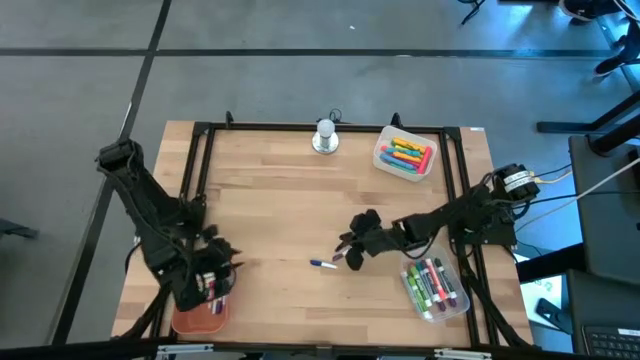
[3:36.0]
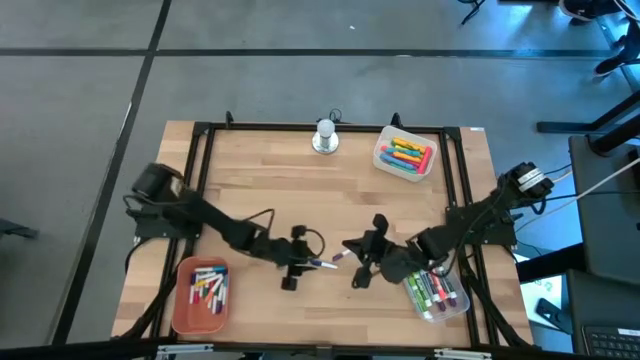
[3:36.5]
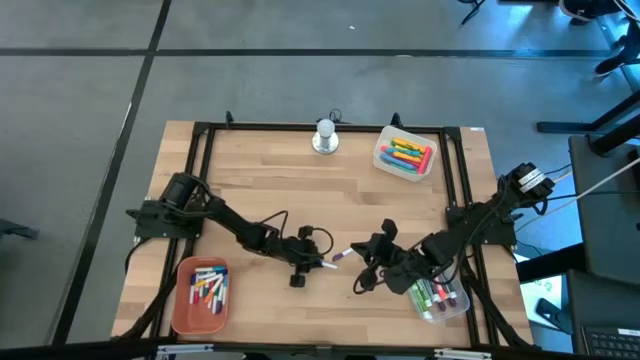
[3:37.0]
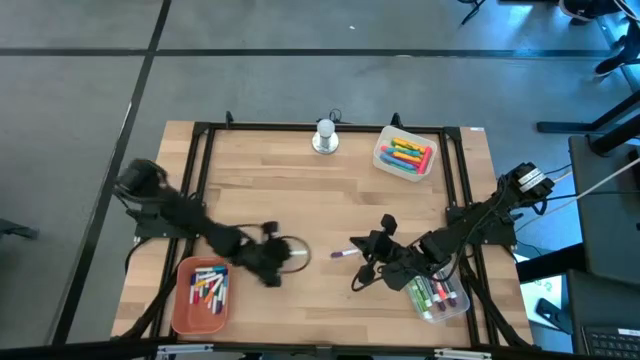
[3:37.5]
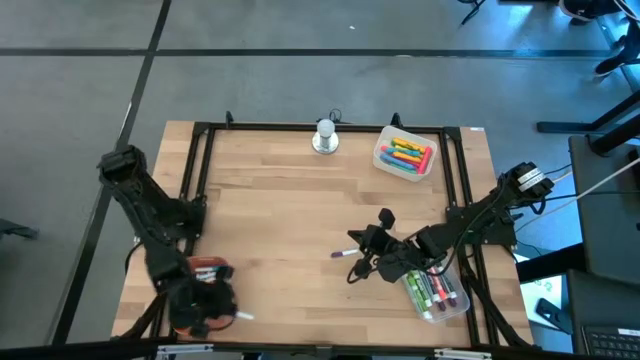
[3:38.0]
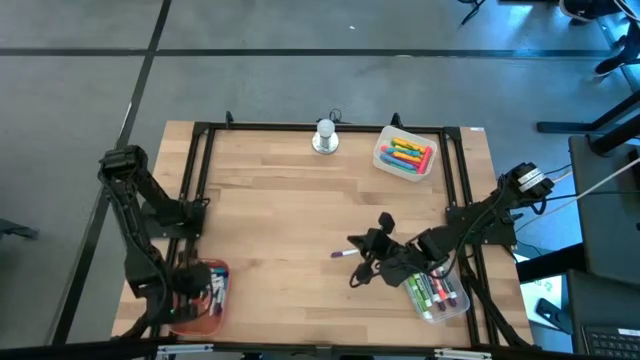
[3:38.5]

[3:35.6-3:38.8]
Task: Pick & Place Markers
Put the small blue highlighter pen into the orange bin

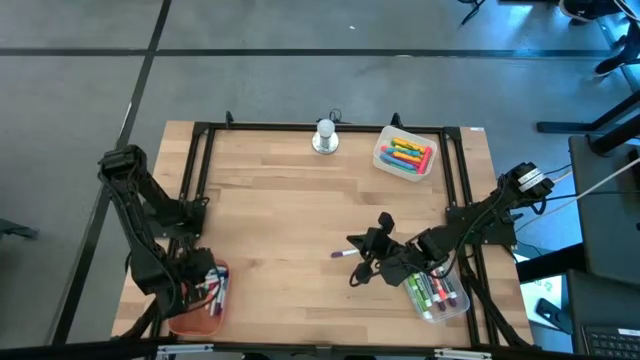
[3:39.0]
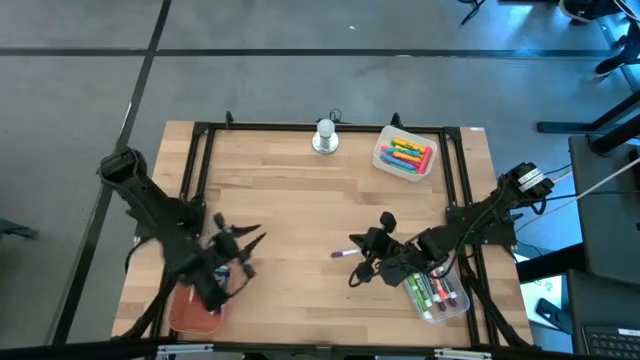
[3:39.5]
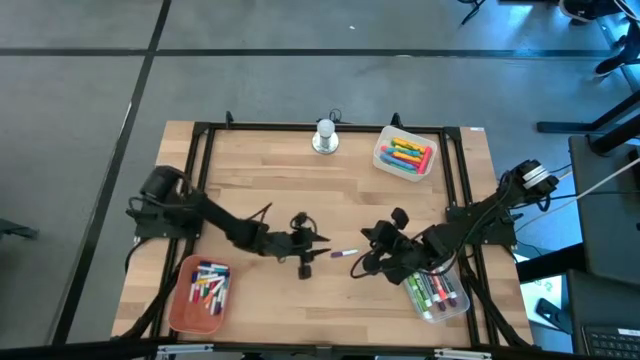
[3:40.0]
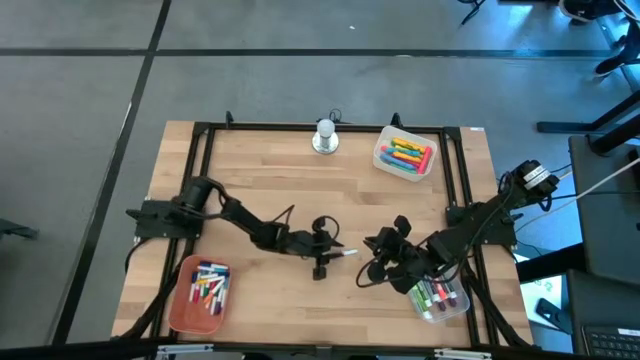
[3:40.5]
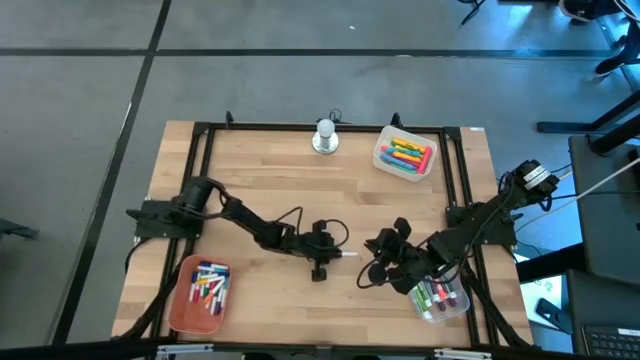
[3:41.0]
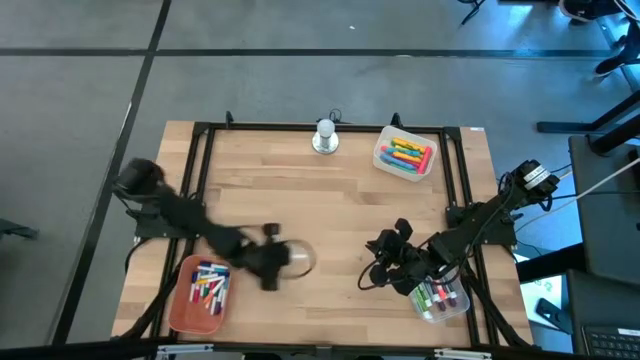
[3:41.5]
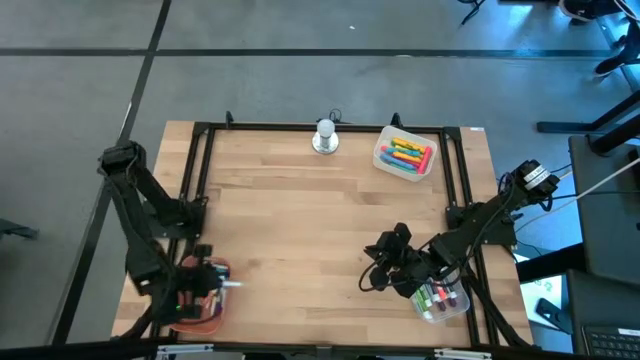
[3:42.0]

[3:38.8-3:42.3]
Put the small violet highlighter pen into the orange bin

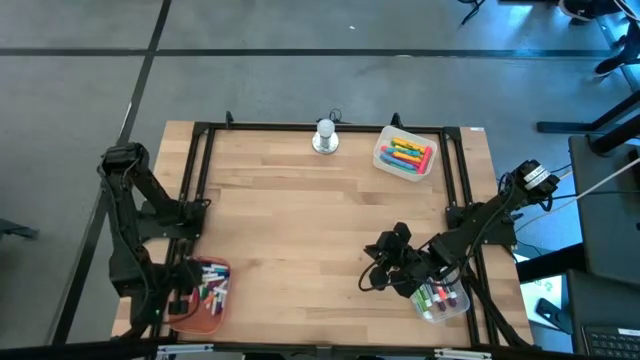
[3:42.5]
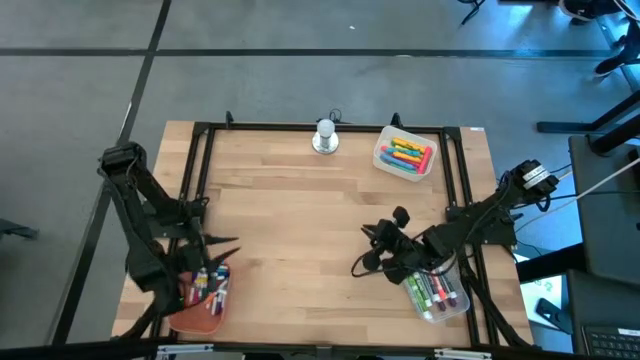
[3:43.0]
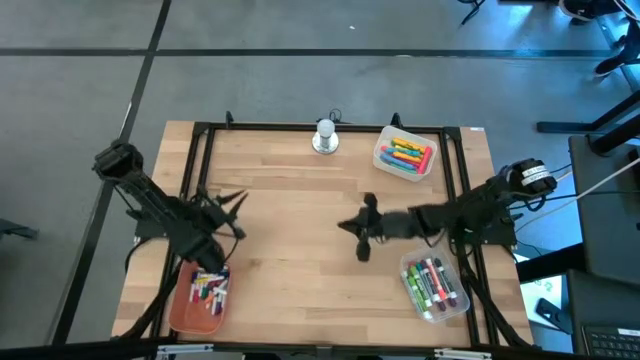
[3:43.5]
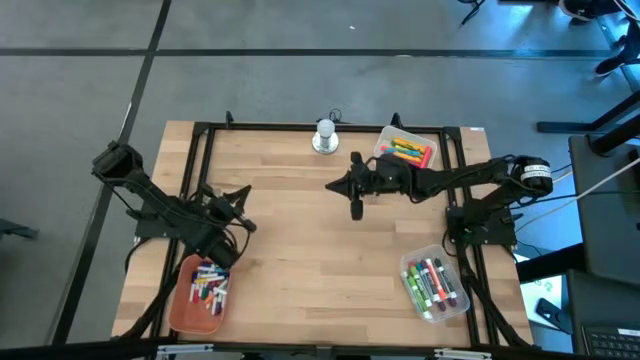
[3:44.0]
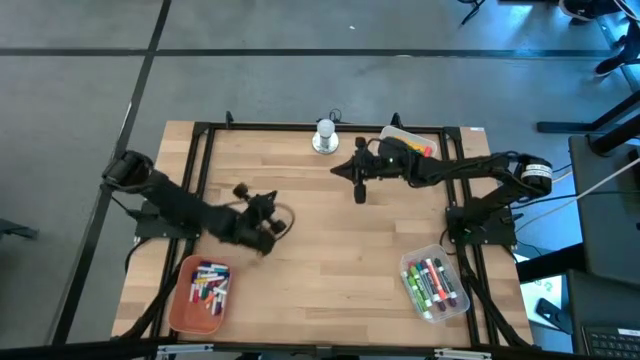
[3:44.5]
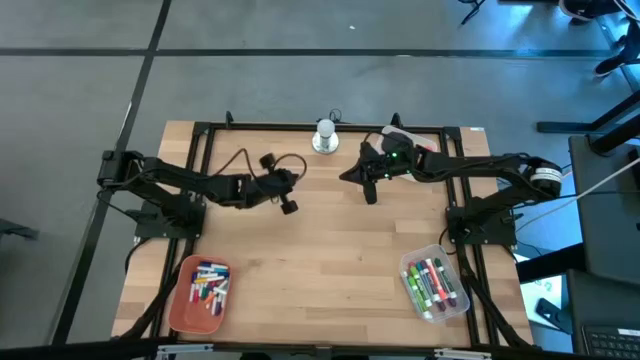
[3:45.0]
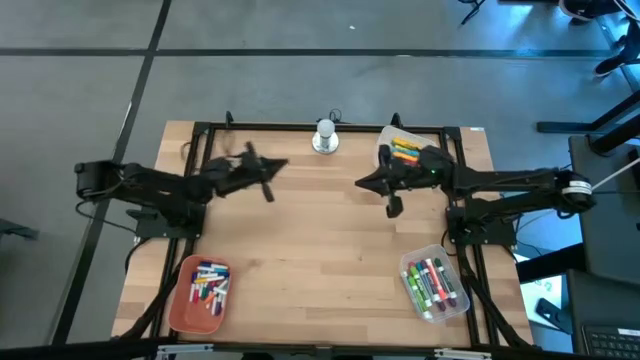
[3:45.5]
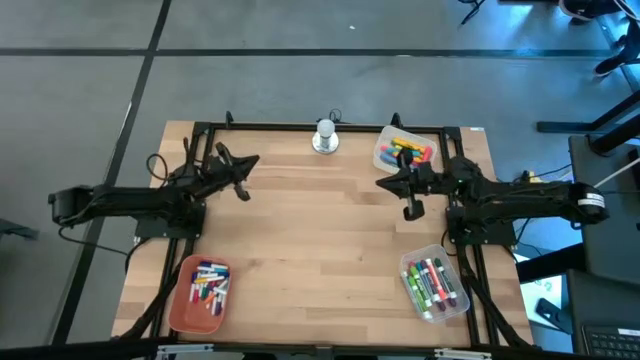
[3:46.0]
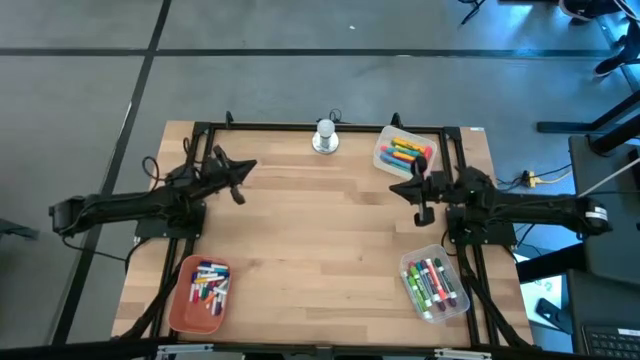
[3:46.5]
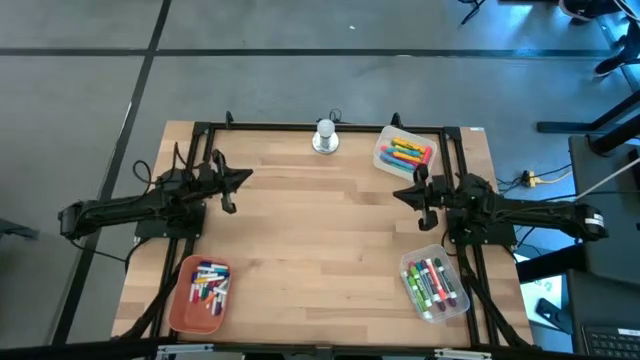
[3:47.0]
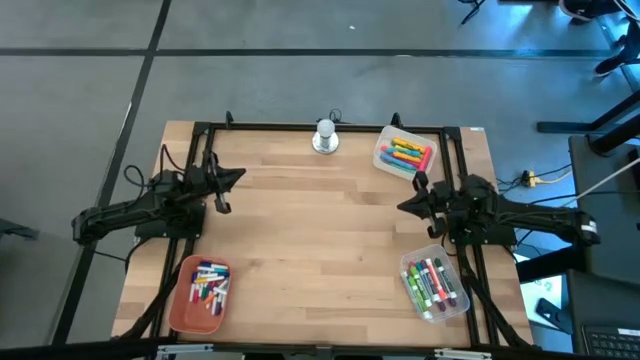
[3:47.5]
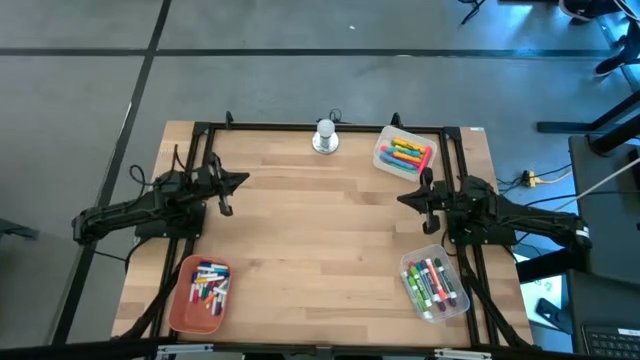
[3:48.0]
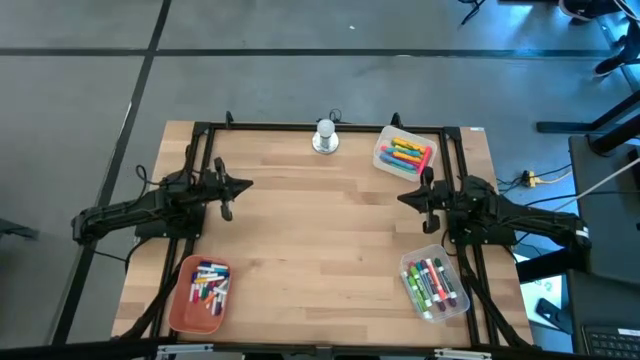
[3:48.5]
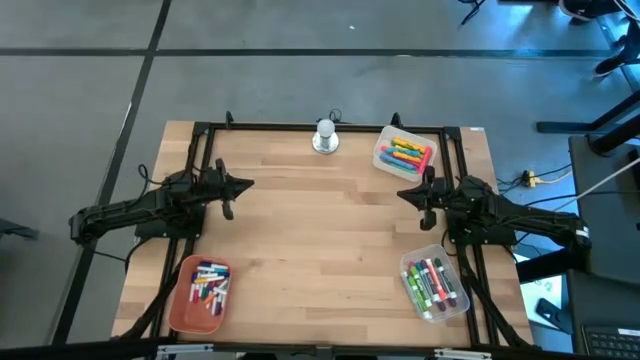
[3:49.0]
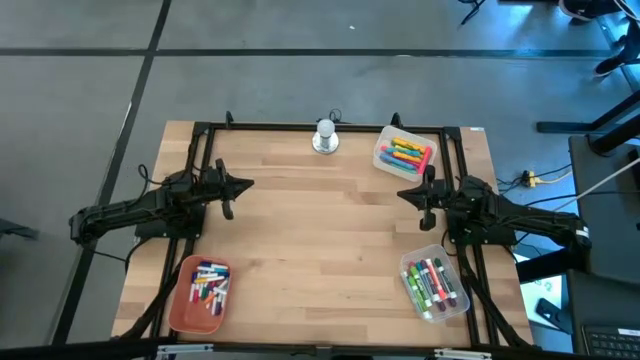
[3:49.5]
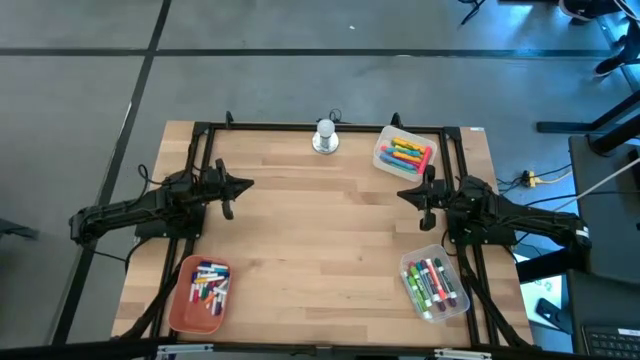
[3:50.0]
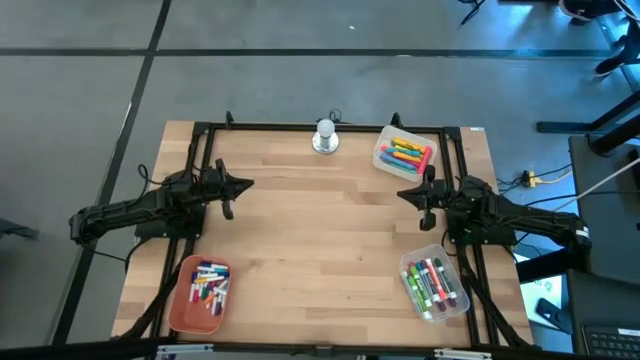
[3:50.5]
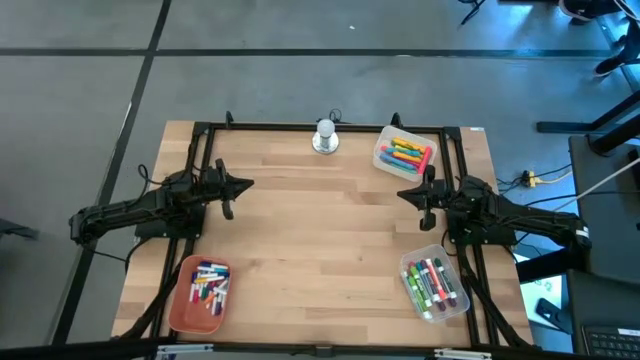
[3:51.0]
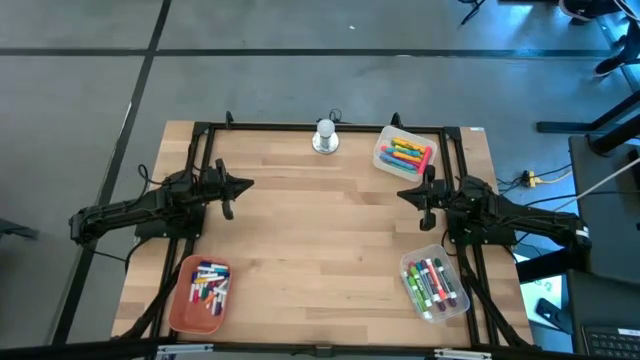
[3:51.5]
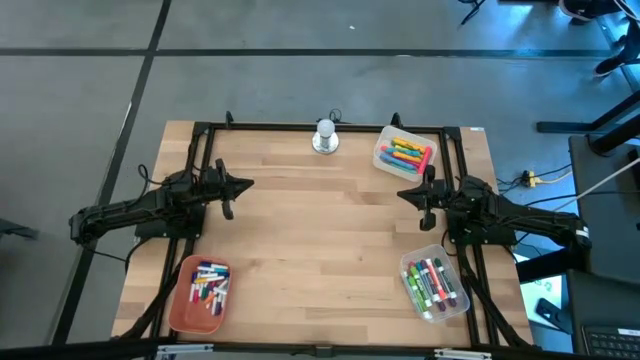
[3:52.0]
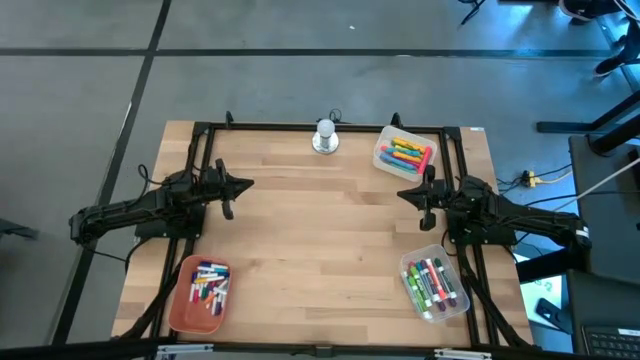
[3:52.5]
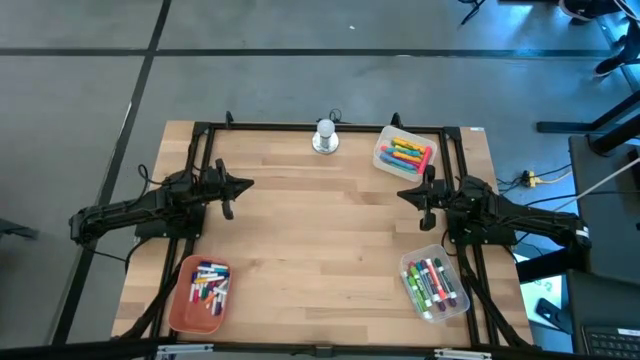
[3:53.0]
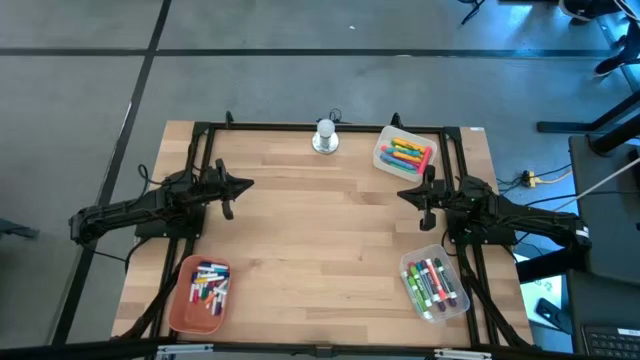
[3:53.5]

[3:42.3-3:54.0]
Return to Home Position

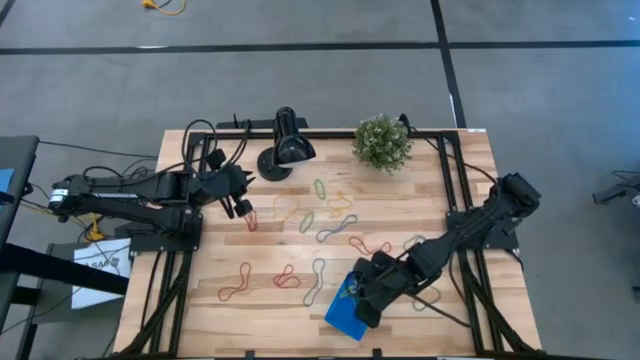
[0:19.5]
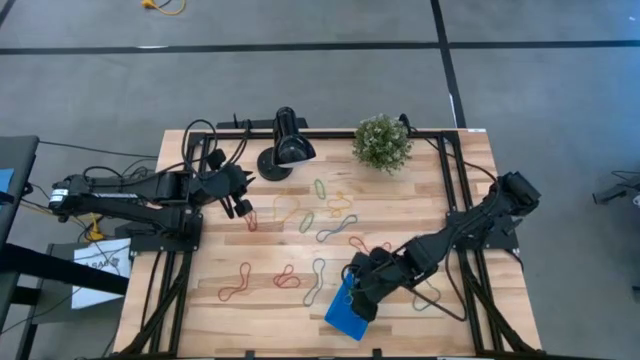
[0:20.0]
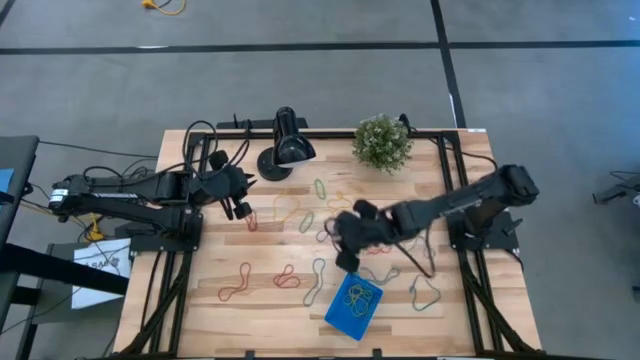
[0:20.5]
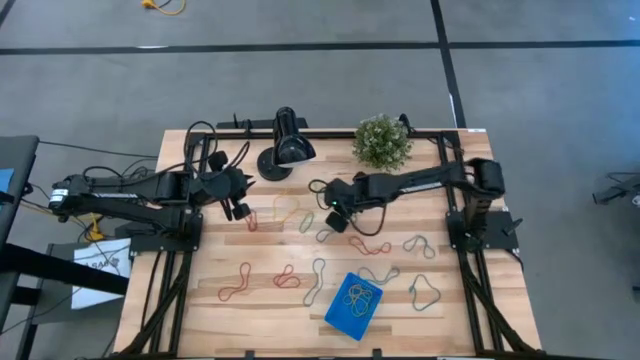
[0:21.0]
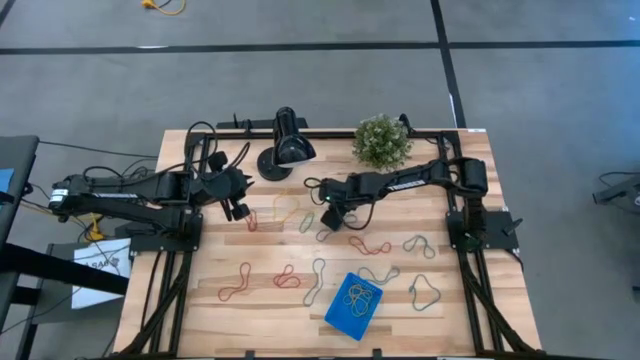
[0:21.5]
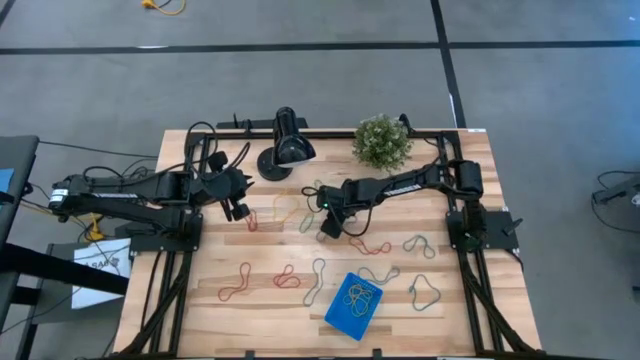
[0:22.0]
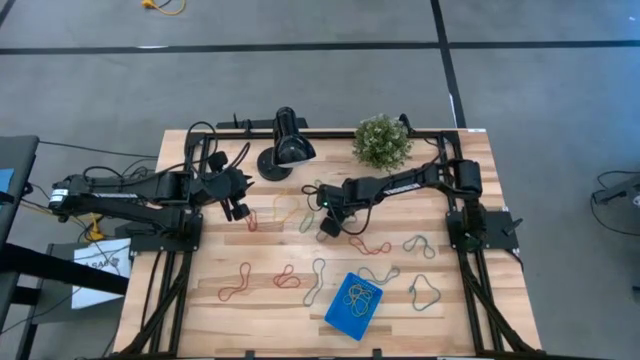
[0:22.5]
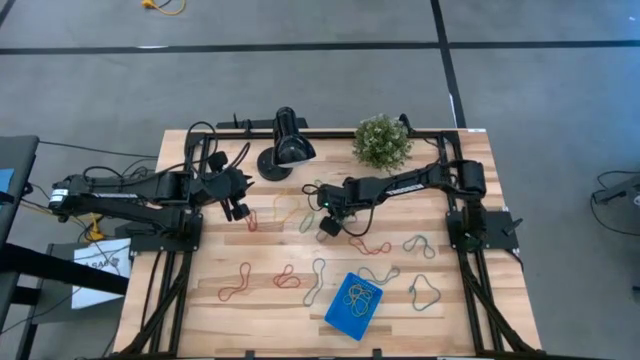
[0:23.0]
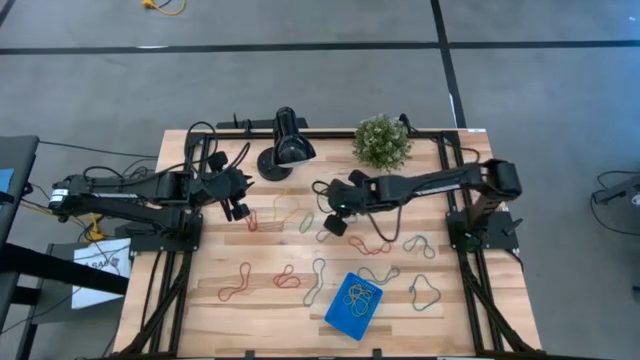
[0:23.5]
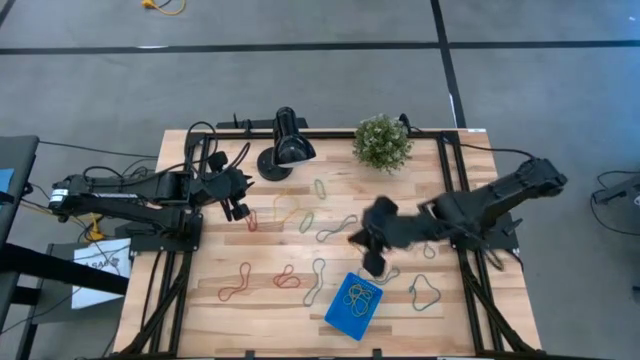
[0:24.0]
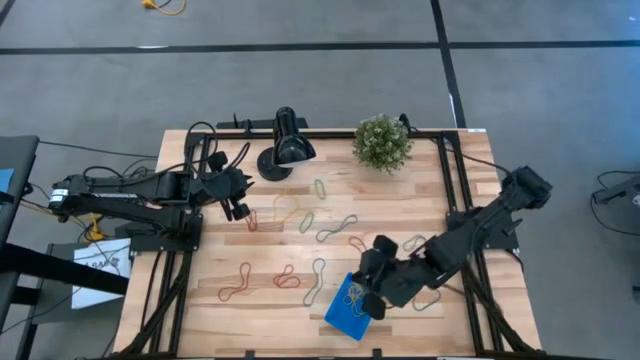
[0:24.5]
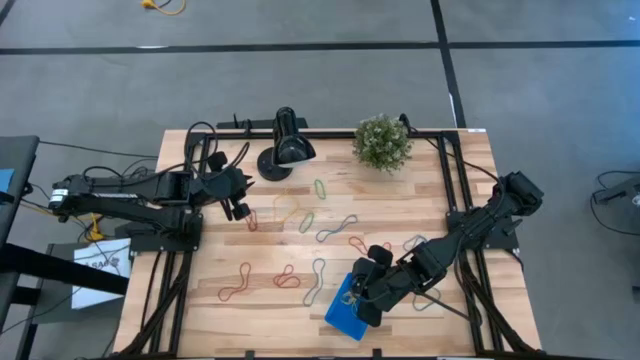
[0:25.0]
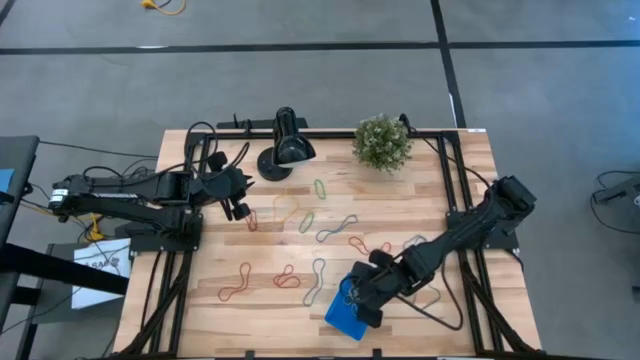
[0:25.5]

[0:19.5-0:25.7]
Task: Pick and place items into bin
Put the yellow rubber band into the blue bin
